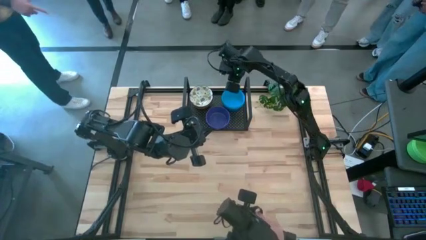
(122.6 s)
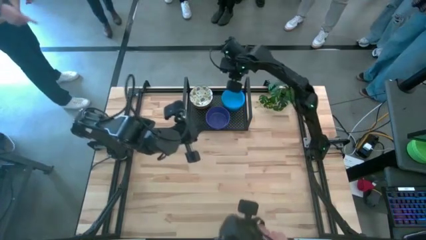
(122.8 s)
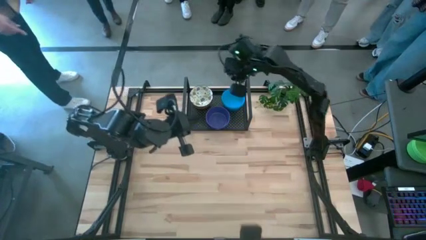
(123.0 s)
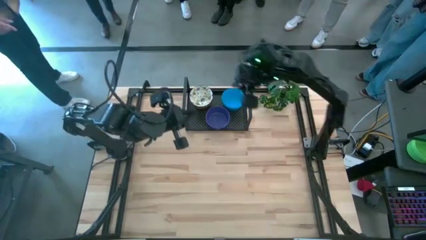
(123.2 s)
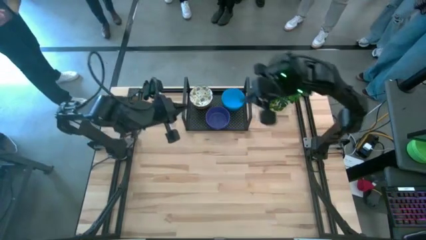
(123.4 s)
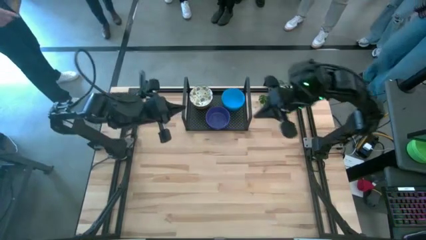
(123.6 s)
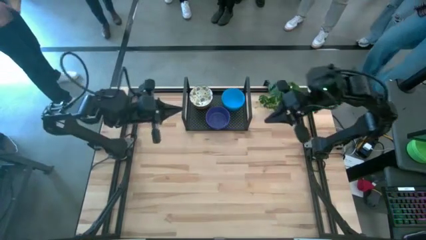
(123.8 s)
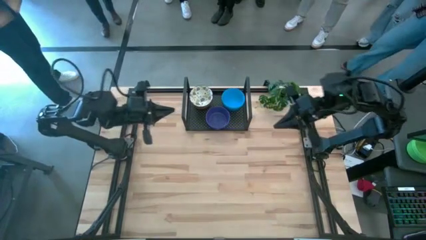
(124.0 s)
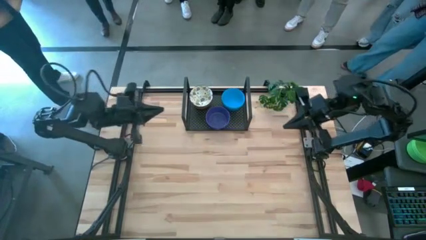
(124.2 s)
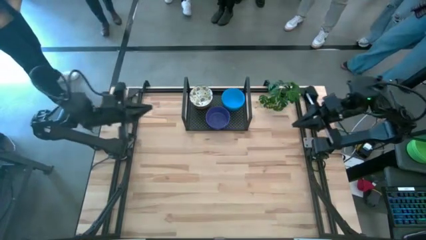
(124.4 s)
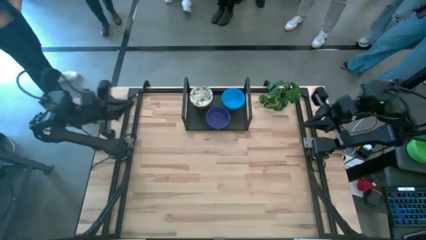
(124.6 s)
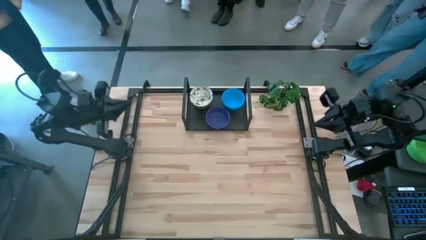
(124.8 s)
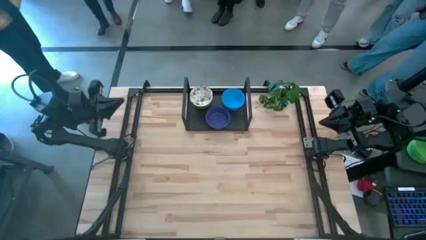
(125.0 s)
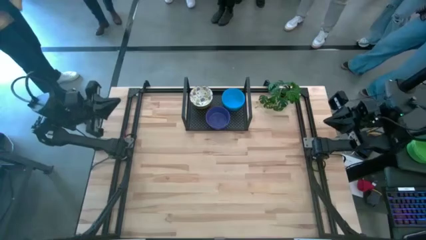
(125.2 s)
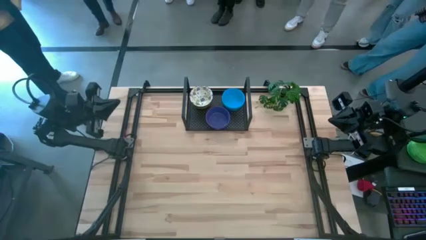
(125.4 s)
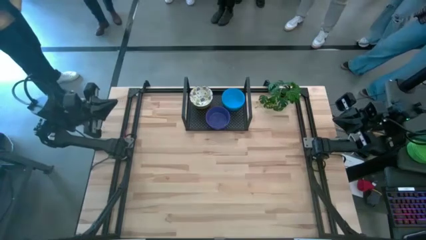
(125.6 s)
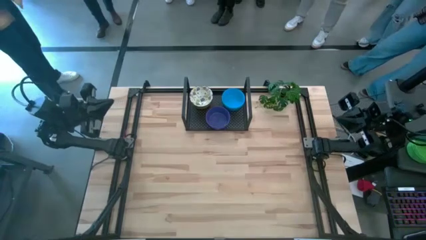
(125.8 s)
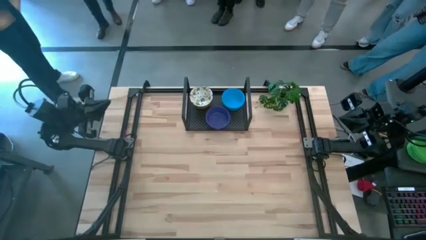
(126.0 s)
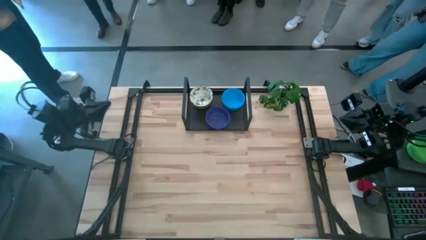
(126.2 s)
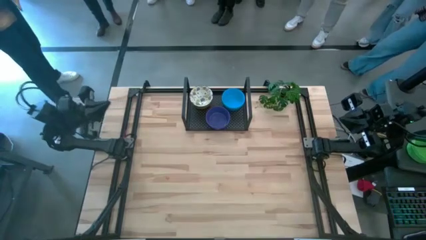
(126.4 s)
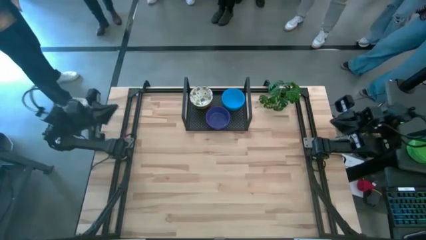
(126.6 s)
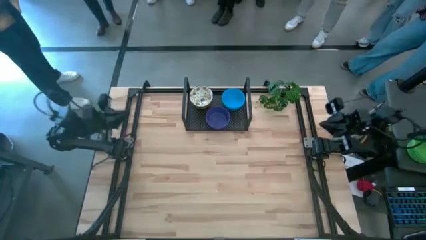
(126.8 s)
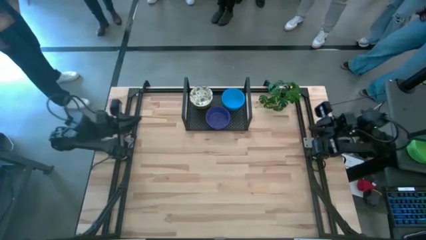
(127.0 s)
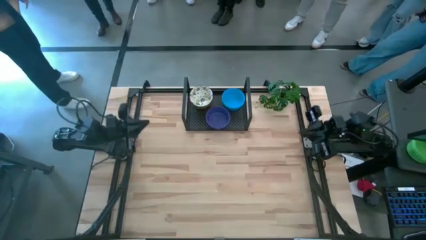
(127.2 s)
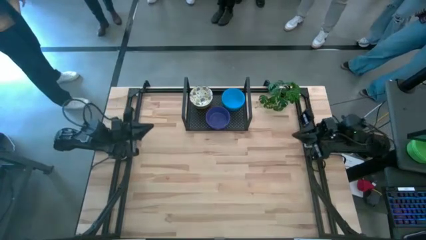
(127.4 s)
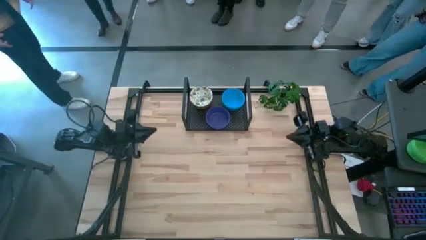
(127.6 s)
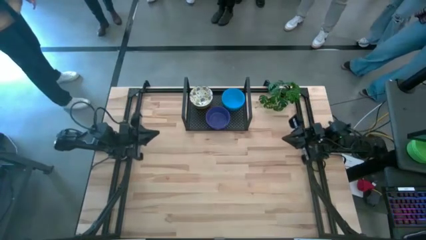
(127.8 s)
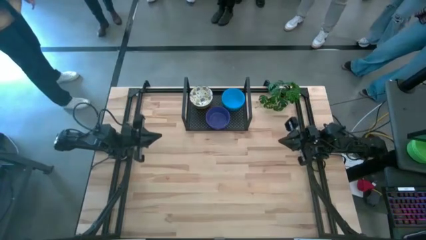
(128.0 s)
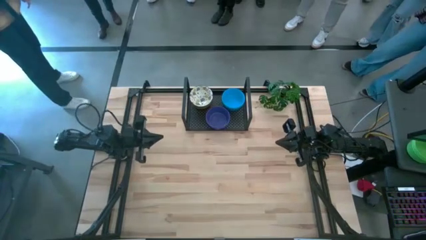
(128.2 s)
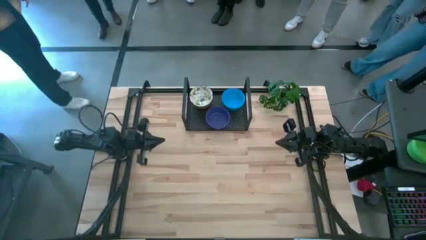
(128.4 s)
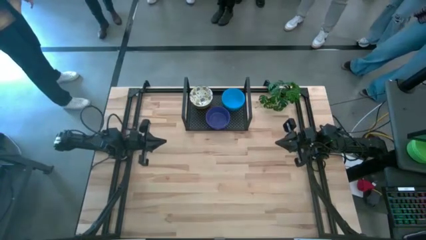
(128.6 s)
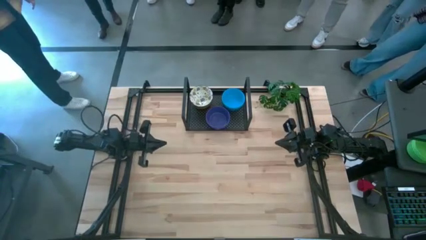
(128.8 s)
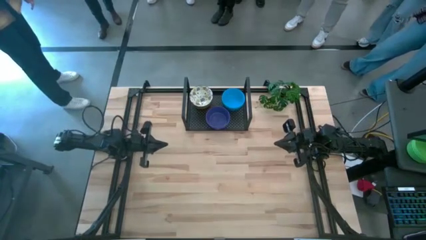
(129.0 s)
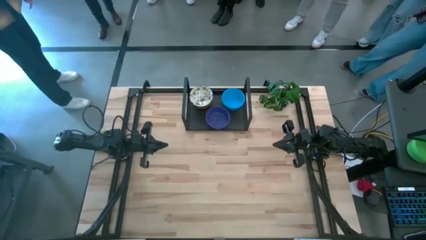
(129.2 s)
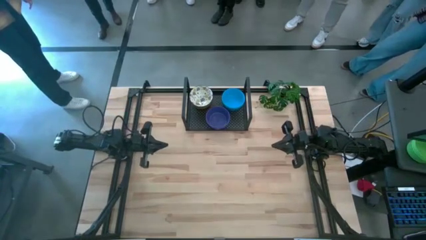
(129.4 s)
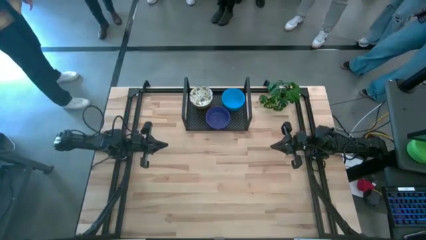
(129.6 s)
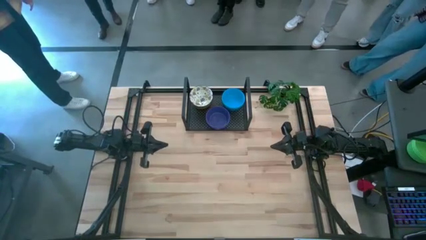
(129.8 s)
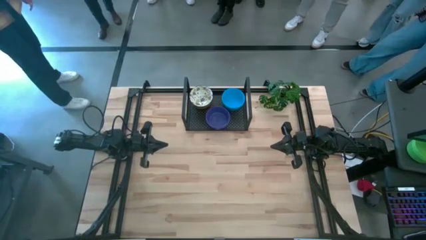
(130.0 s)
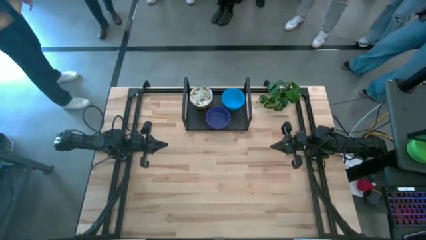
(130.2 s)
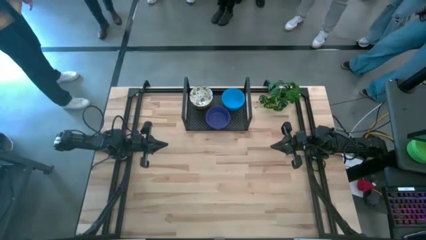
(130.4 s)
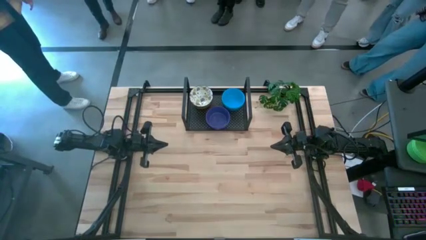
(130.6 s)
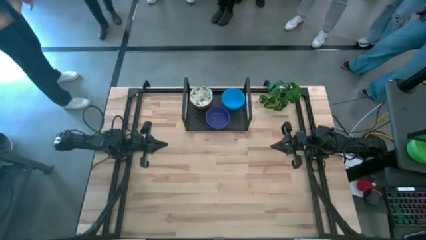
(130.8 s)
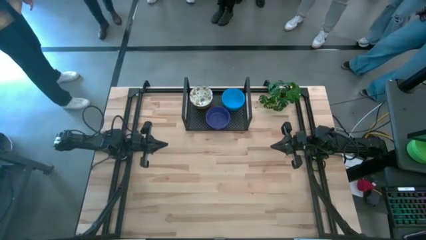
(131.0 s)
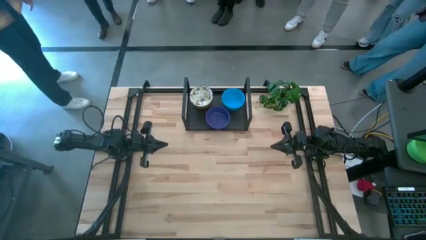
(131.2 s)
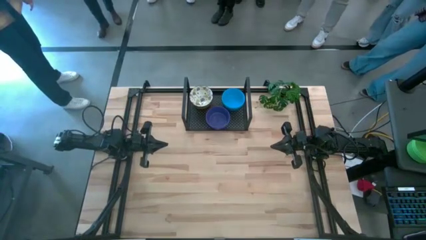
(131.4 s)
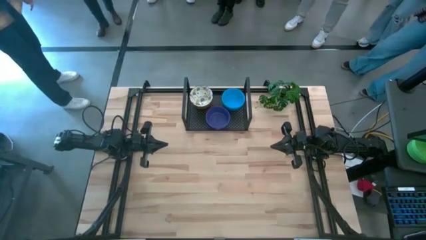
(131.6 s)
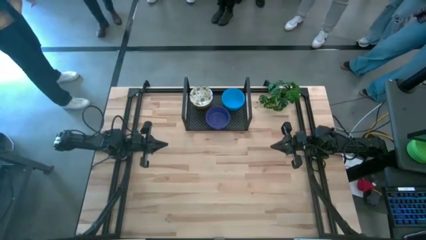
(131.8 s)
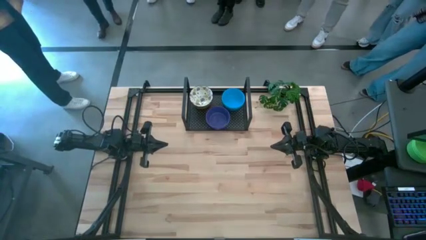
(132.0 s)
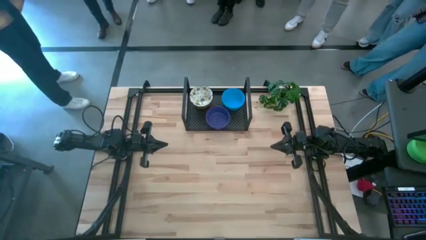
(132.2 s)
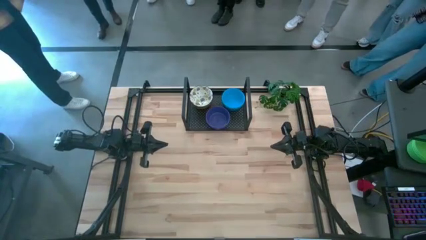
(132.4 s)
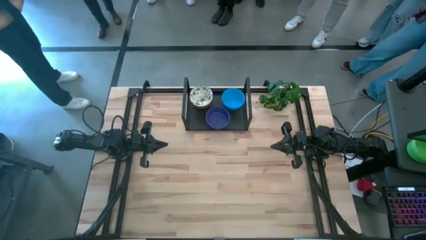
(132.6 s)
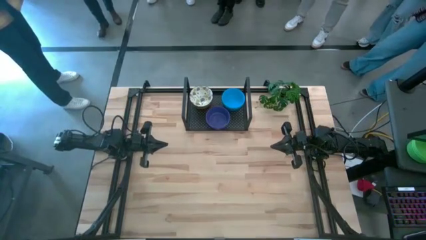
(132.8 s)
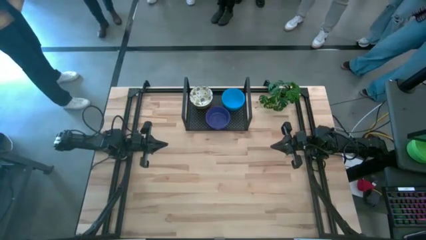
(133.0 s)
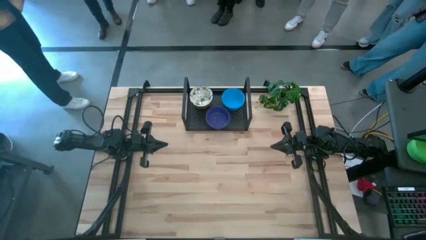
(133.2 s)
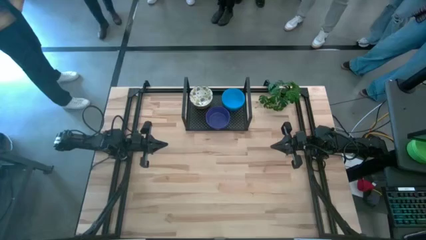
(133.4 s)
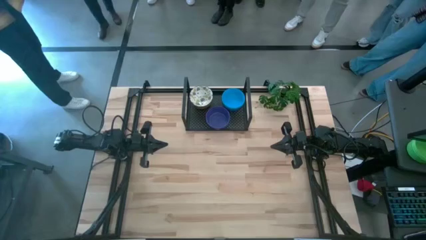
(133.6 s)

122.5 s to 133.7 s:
Task: Pick & Place Mini bowls
Return to Home Position

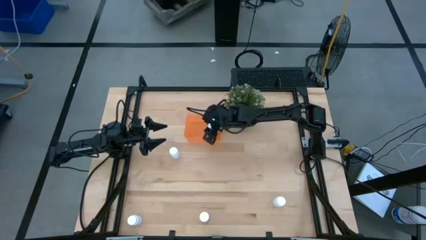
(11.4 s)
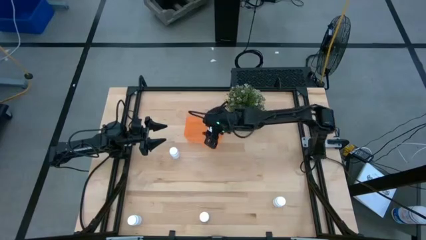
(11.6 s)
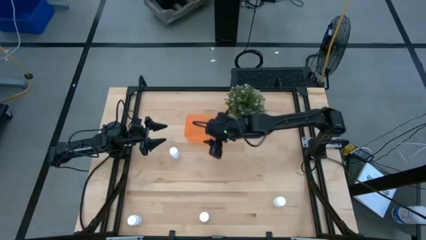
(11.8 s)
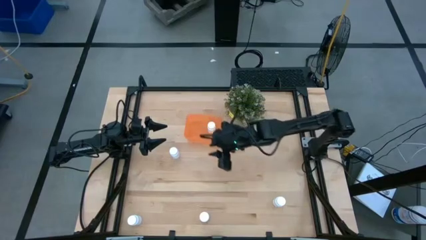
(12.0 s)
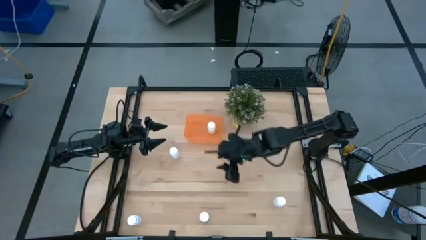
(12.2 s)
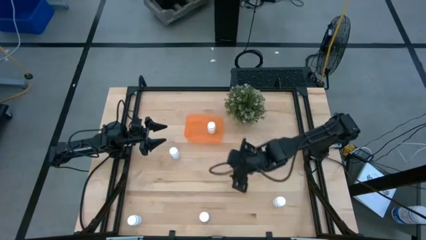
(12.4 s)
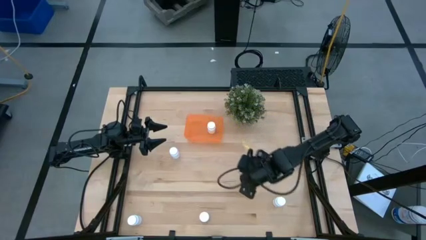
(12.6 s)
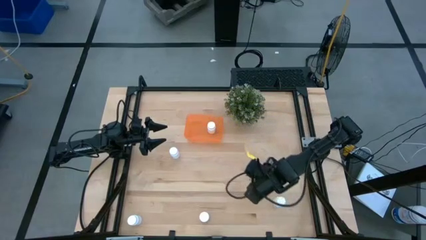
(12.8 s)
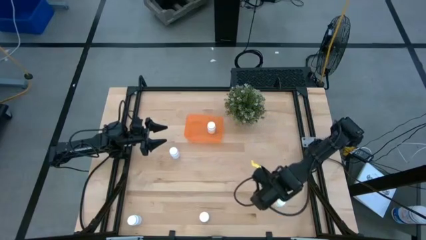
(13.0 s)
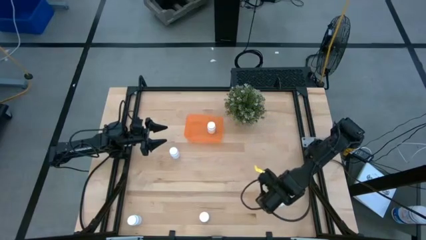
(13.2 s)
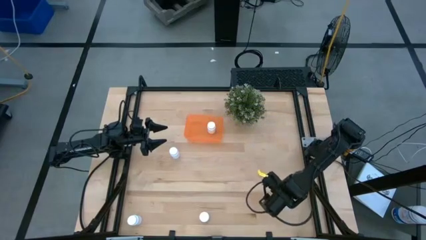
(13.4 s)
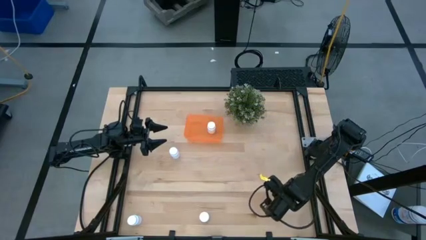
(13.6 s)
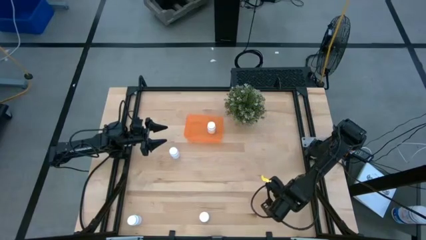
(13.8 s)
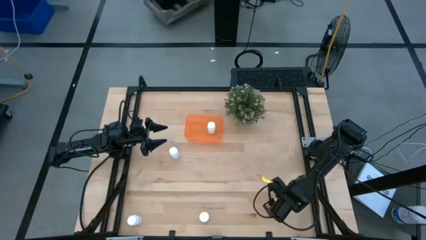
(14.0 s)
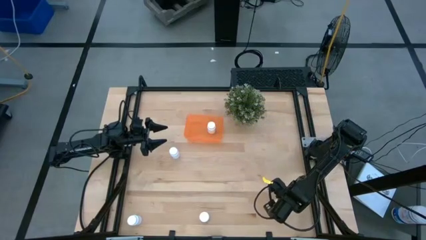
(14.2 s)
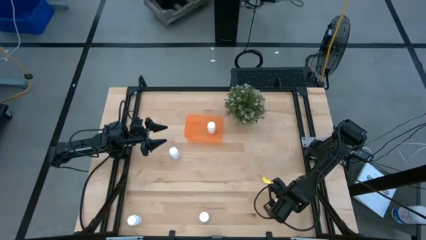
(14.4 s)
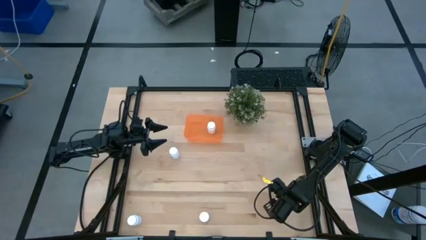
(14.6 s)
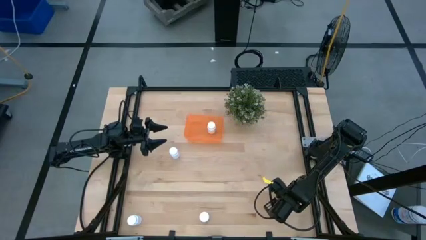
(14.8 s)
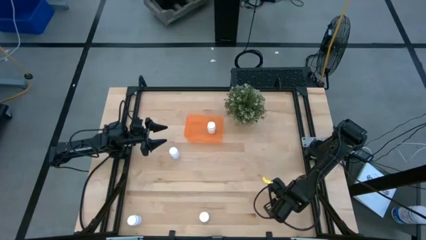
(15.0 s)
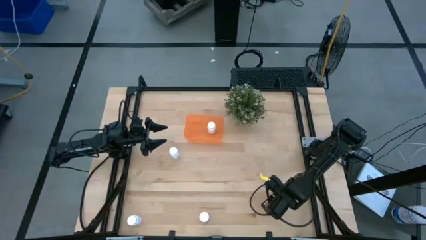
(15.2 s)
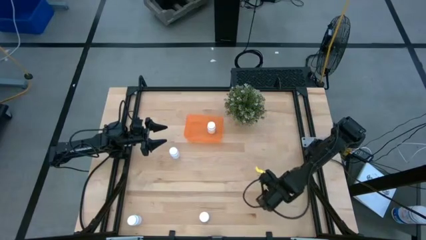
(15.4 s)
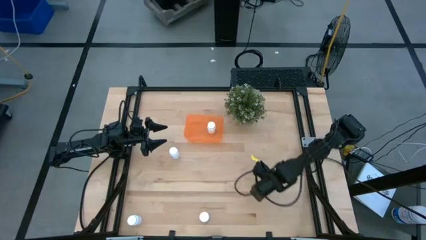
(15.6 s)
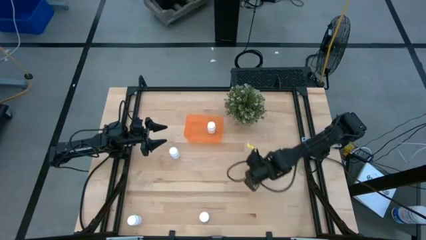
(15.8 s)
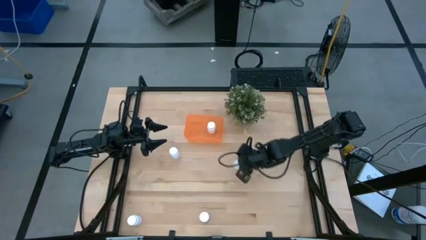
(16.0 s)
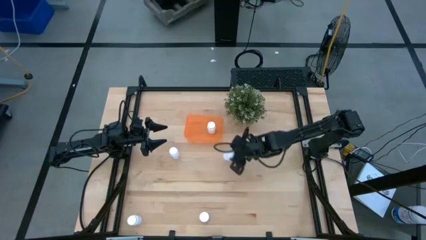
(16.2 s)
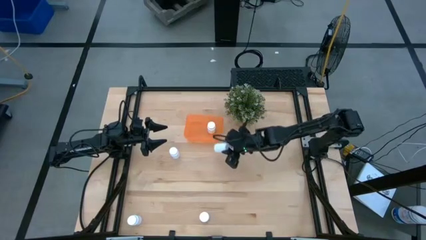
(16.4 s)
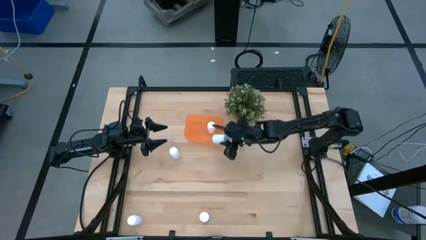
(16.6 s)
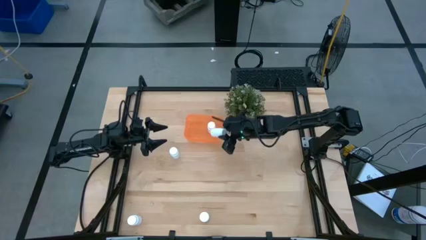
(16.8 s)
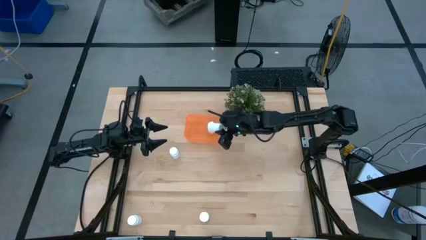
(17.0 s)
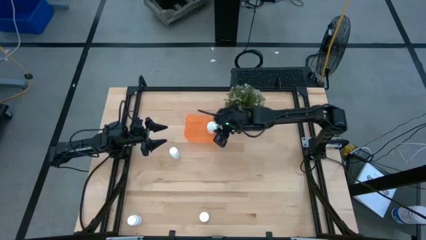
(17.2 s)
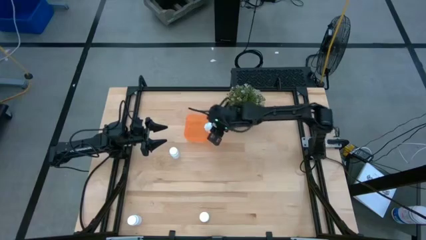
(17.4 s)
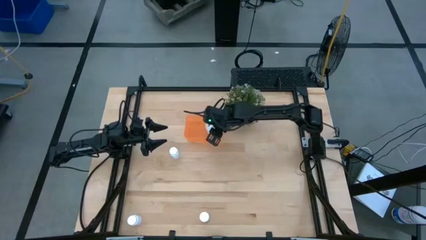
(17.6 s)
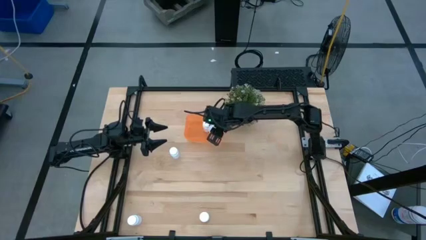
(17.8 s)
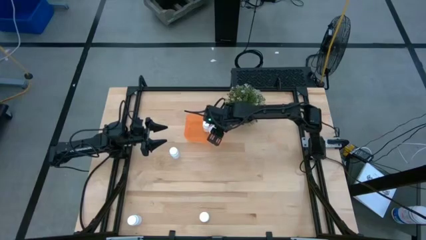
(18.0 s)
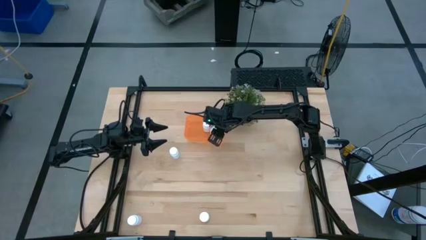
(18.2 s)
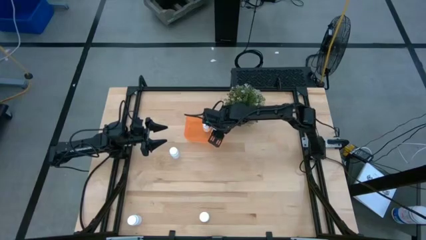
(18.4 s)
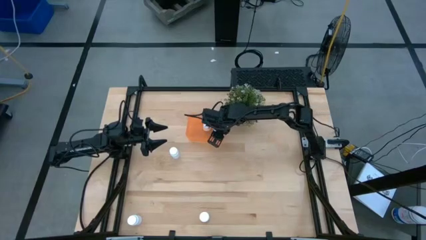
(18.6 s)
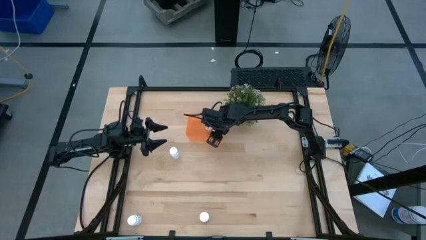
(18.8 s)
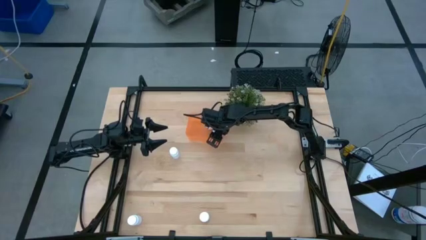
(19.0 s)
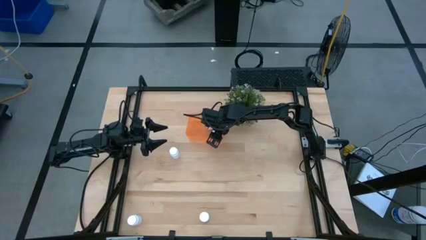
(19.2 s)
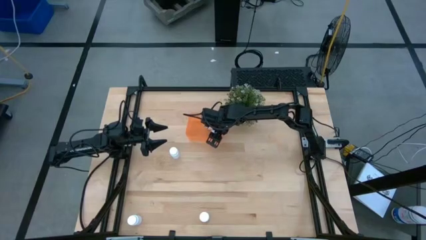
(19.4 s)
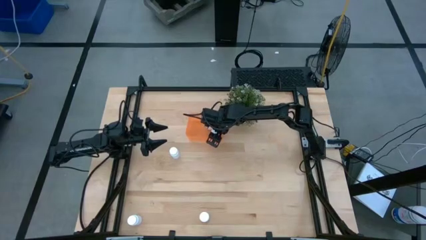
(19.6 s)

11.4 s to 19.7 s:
Task: Pick and place pill bottles into a basket
Put the white pill bottle into the orange bin
